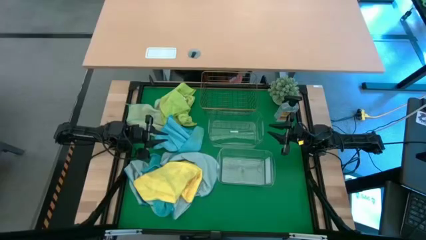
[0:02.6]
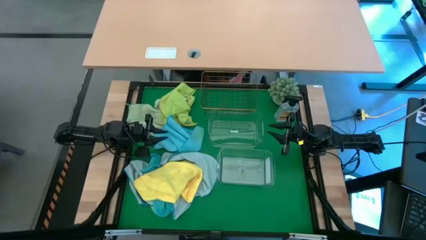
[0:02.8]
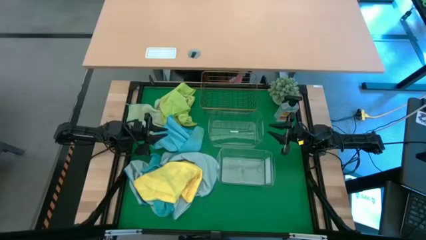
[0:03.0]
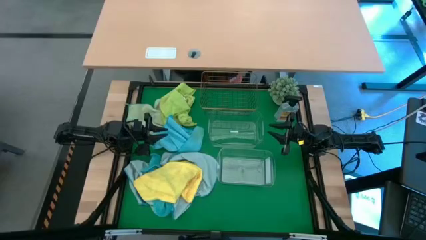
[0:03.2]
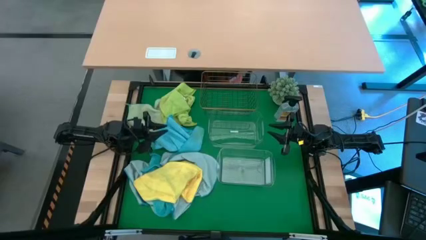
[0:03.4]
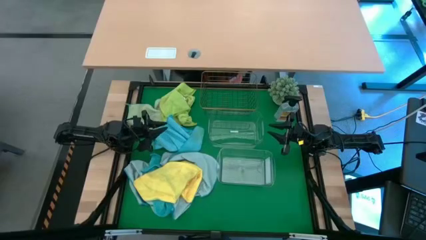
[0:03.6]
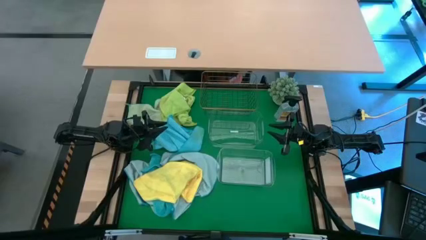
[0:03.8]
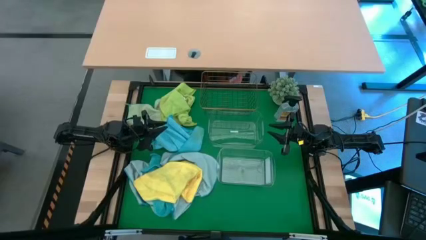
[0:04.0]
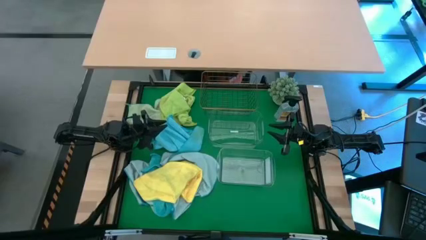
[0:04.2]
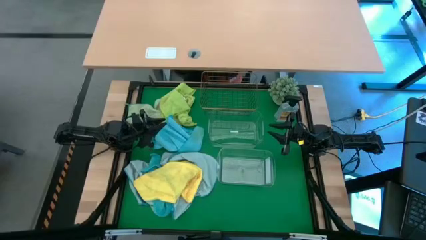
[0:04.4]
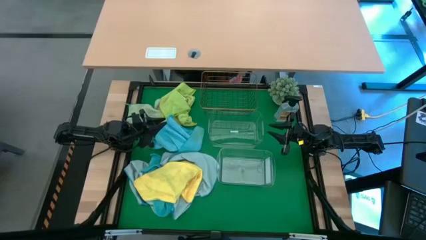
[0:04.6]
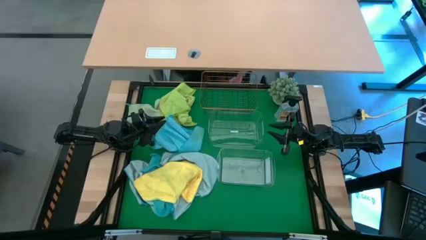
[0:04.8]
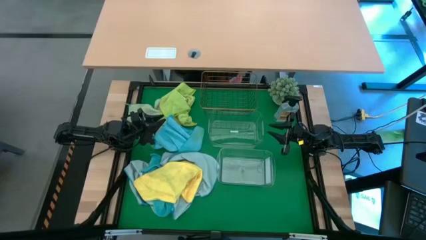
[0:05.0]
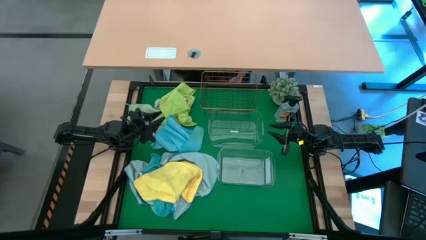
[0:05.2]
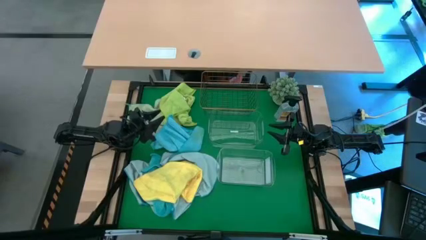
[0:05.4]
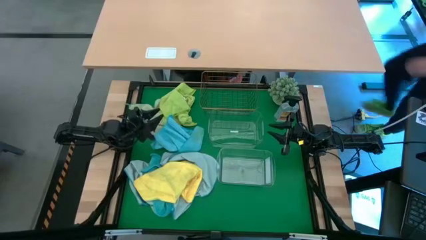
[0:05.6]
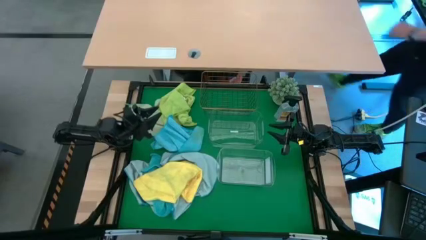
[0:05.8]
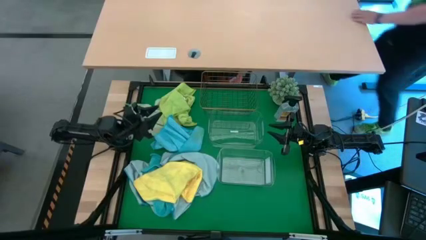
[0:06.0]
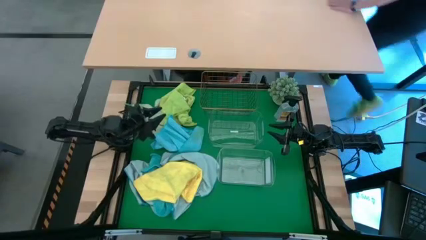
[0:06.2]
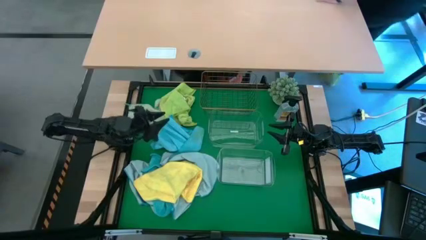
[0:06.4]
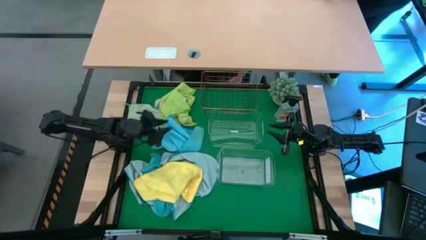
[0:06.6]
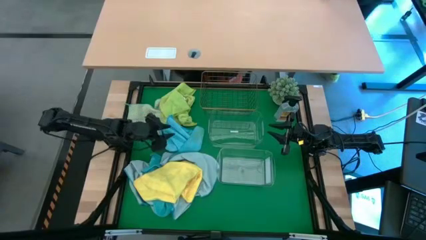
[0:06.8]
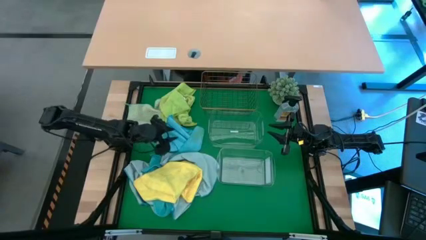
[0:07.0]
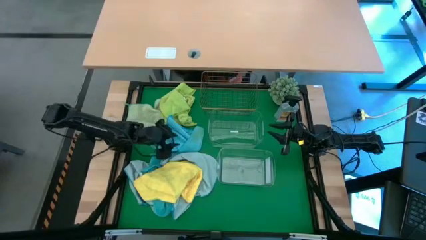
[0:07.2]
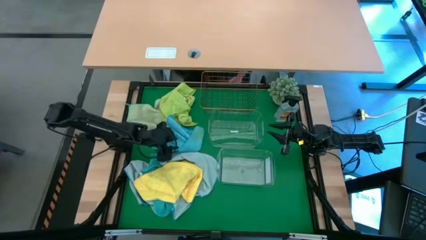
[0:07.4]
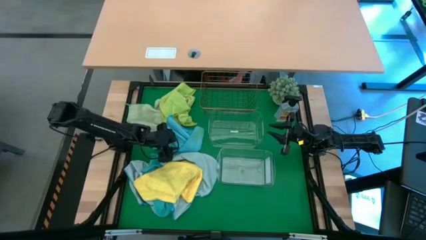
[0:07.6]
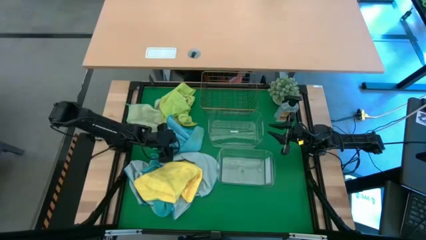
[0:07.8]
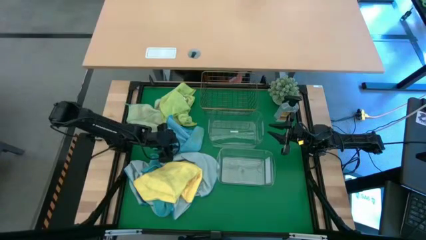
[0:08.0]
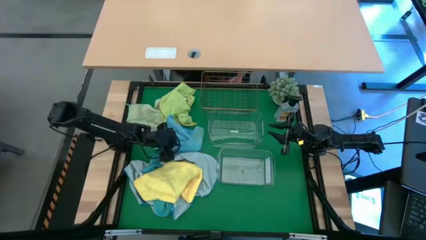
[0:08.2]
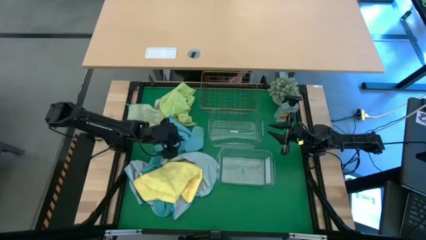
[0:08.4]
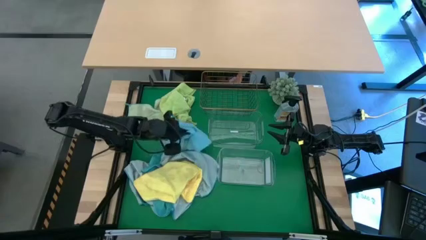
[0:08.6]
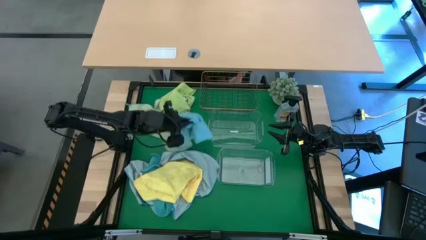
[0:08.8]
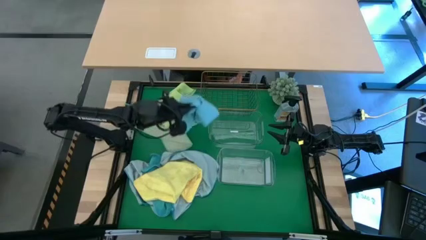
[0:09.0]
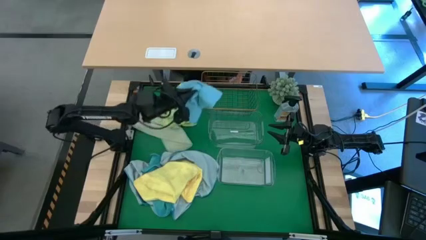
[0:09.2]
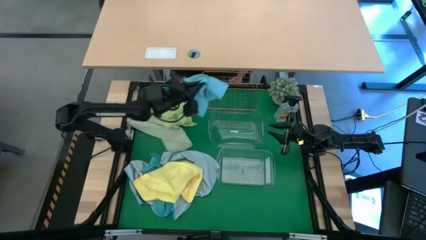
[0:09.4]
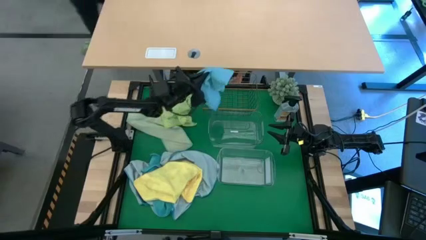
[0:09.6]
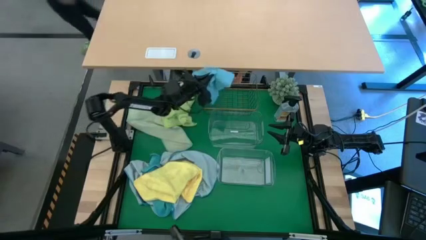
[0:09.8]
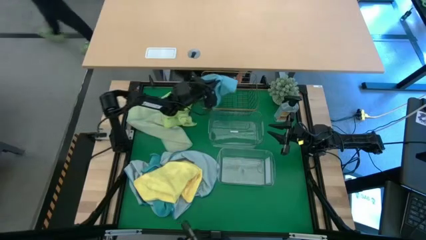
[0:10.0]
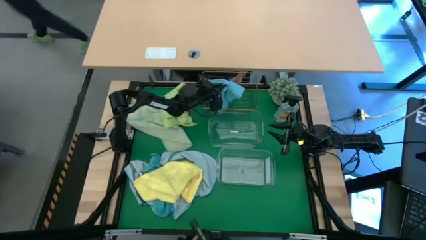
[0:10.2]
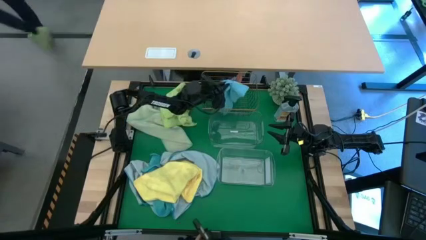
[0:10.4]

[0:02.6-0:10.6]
Task: Sort microfiber towel by color & place in baskets
Put the blue microfiber towel into the wire basket

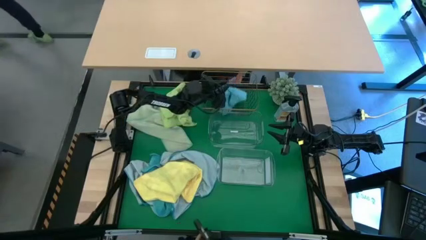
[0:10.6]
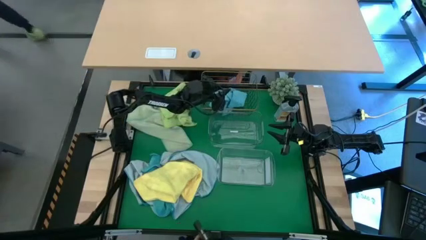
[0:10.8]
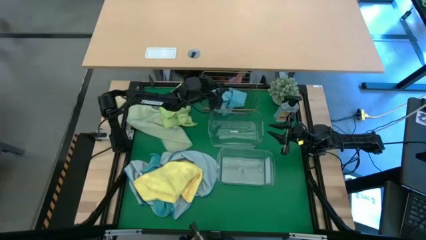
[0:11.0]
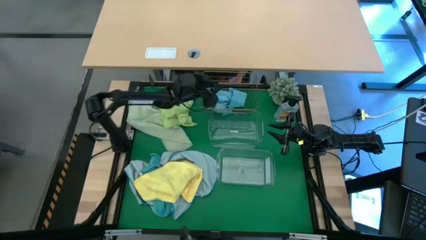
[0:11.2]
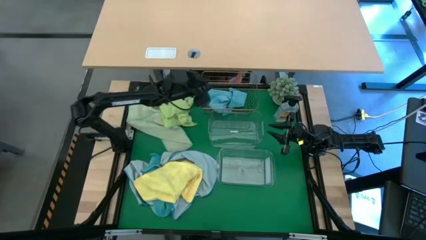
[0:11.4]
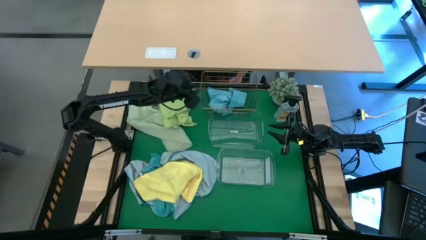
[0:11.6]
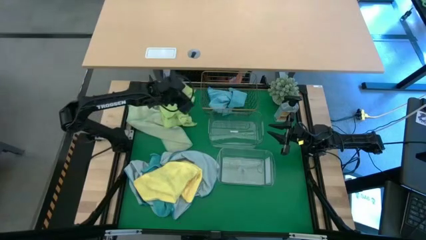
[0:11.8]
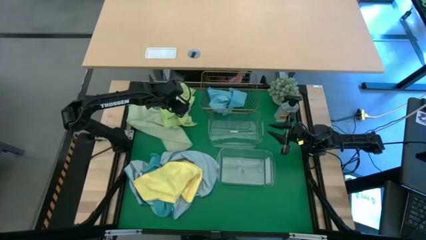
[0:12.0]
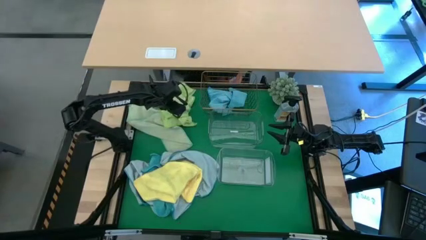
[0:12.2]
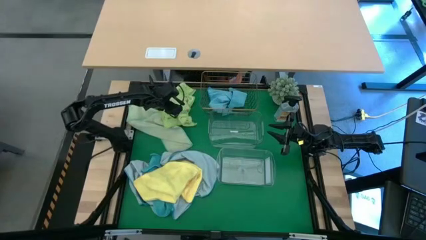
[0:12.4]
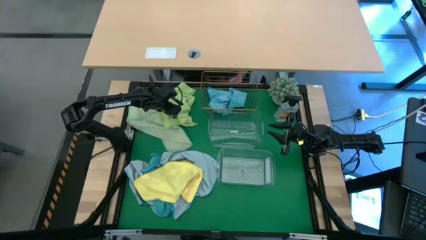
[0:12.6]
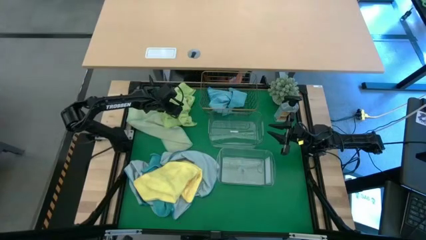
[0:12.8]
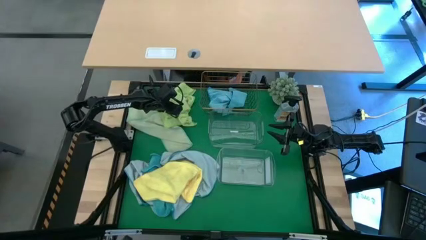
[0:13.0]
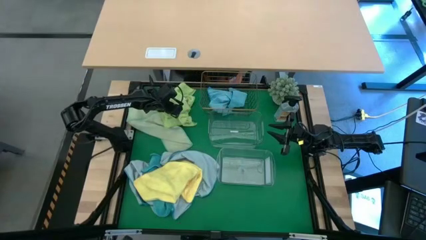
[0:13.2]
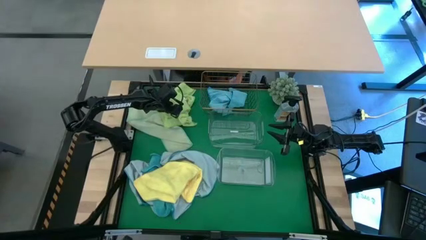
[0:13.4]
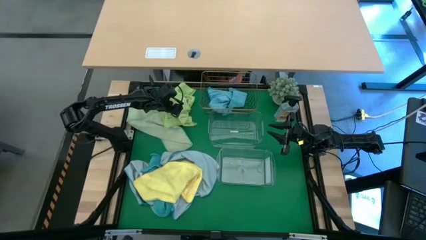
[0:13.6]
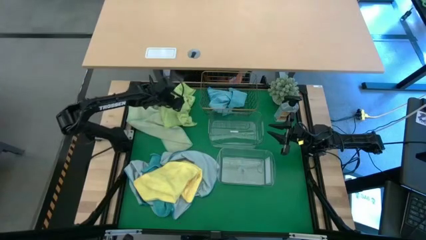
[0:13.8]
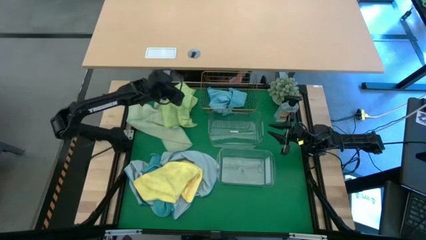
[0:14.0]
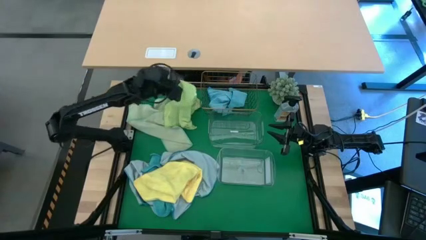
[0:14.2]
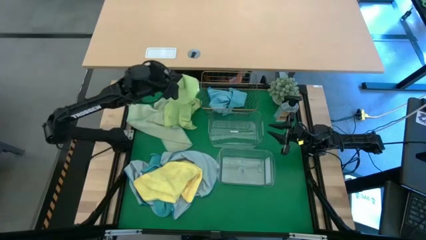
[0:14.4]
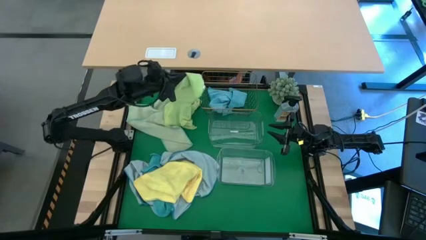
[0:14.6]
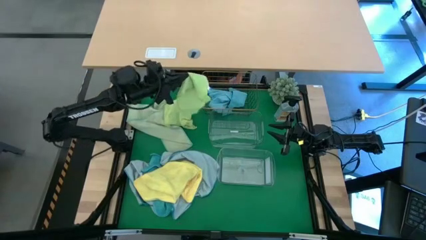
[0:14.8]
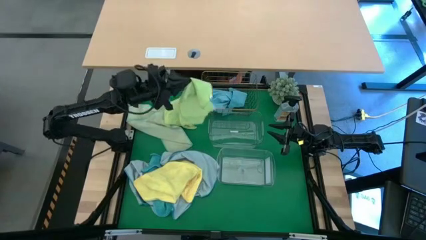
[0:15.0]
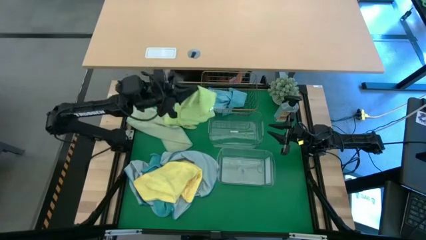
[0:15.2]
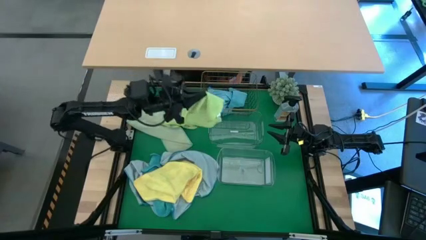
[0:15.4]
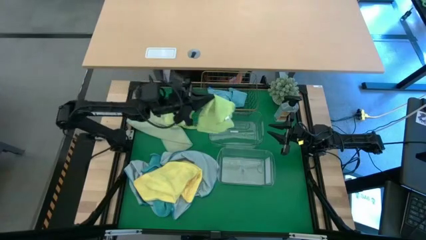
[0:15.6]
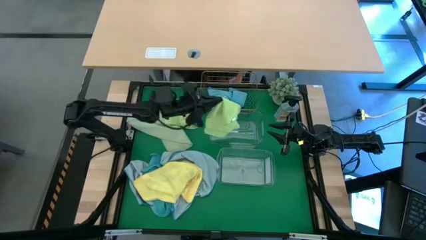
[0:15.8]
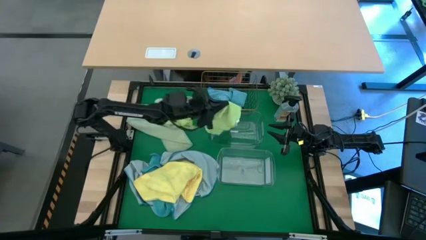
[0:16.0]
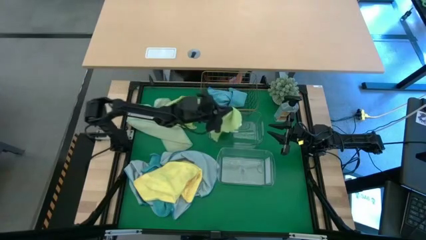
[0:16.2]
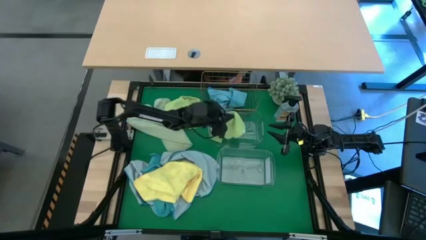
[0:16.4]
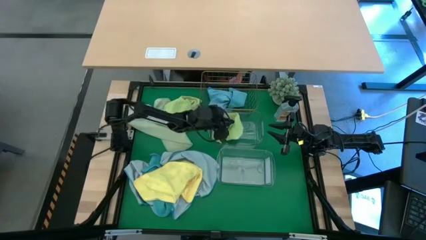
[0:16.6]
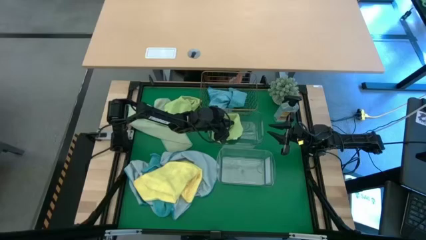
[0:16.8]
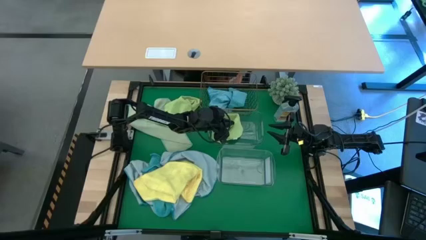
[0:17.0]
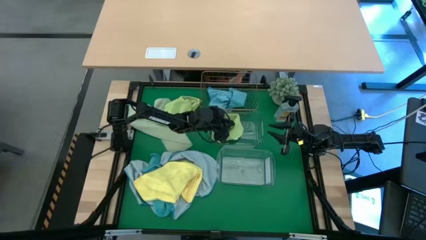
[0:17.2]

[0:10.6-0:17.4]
Put the green microfiber towel into the top transparent bin
